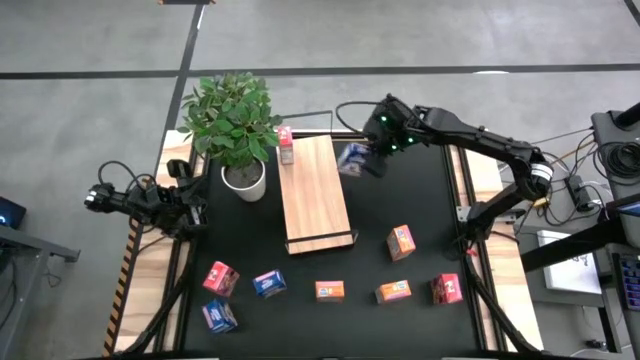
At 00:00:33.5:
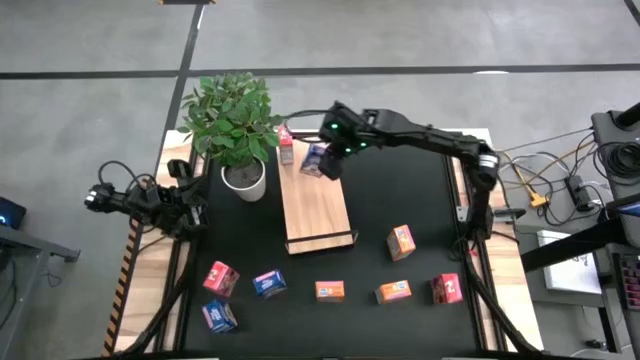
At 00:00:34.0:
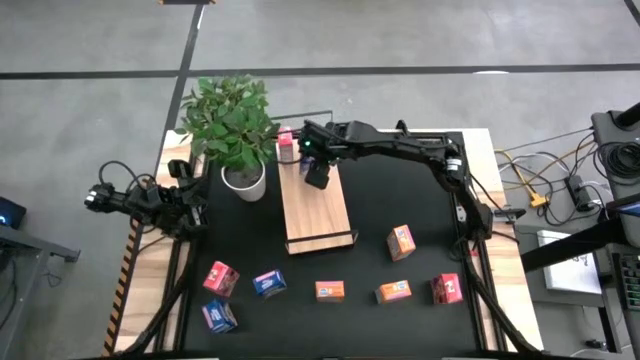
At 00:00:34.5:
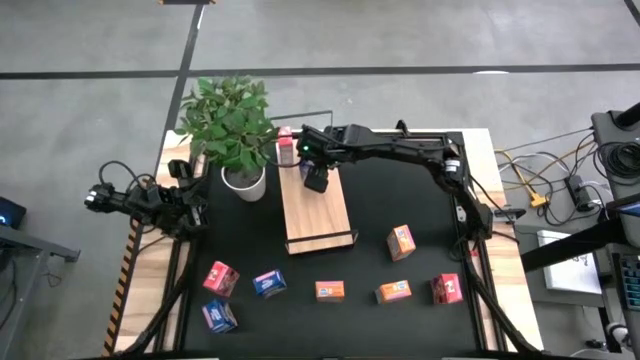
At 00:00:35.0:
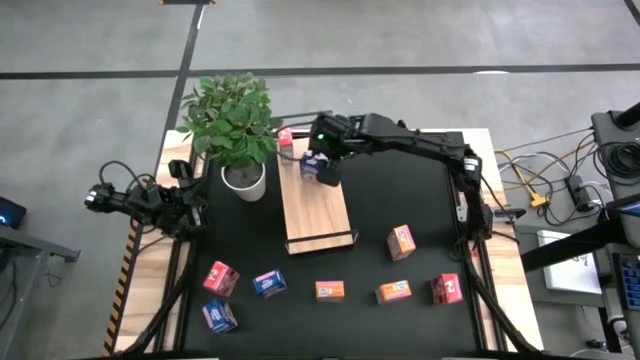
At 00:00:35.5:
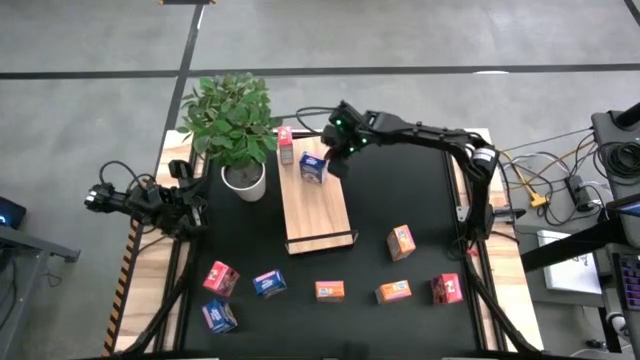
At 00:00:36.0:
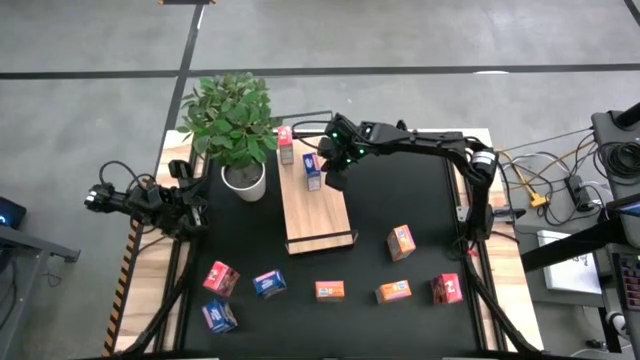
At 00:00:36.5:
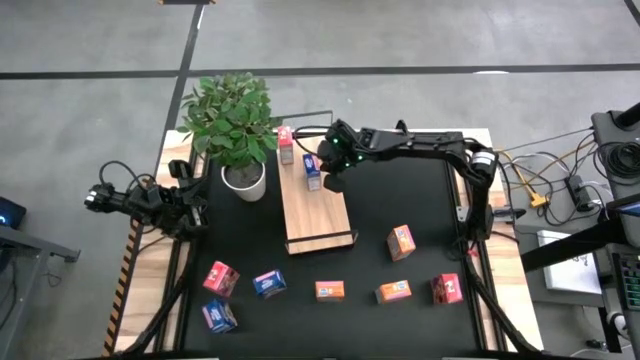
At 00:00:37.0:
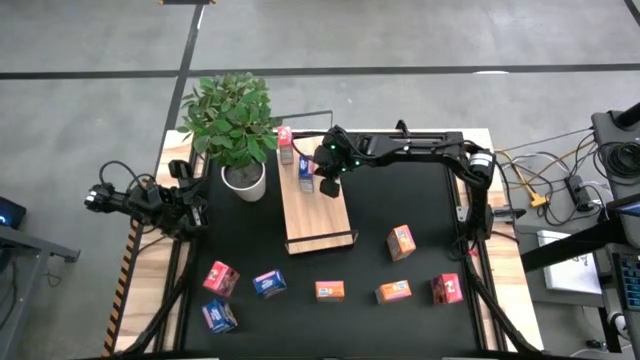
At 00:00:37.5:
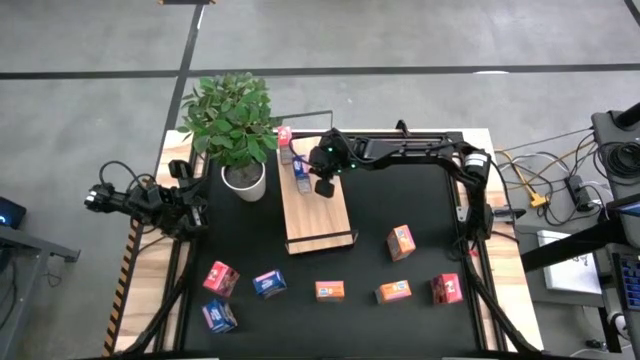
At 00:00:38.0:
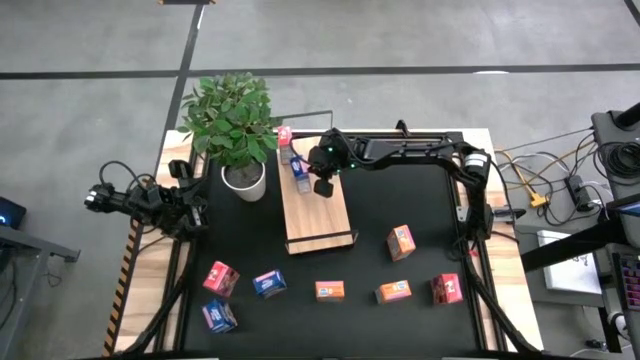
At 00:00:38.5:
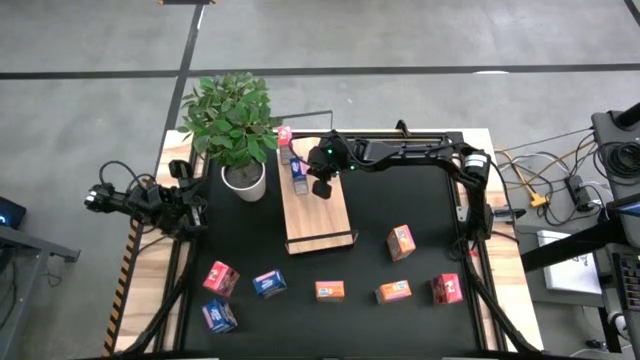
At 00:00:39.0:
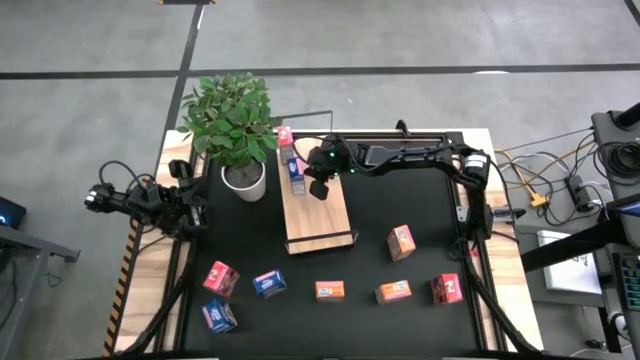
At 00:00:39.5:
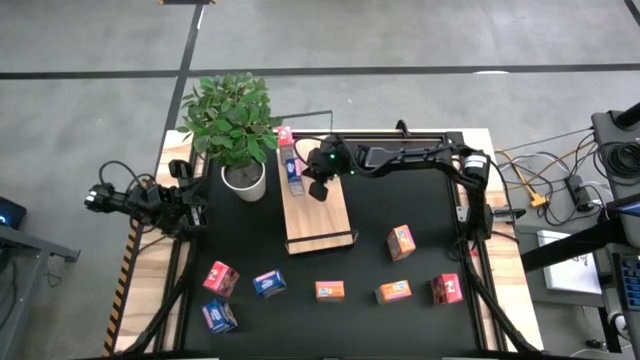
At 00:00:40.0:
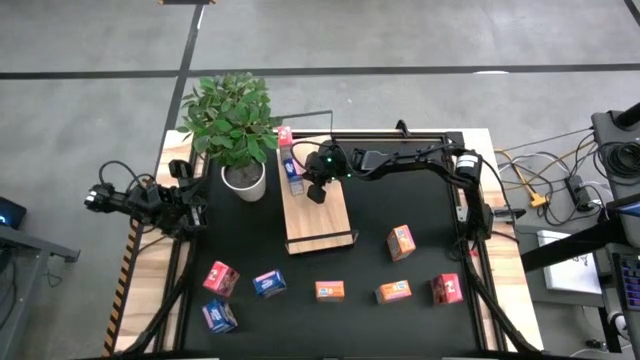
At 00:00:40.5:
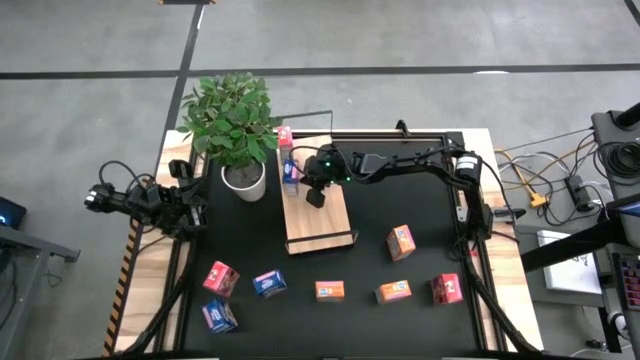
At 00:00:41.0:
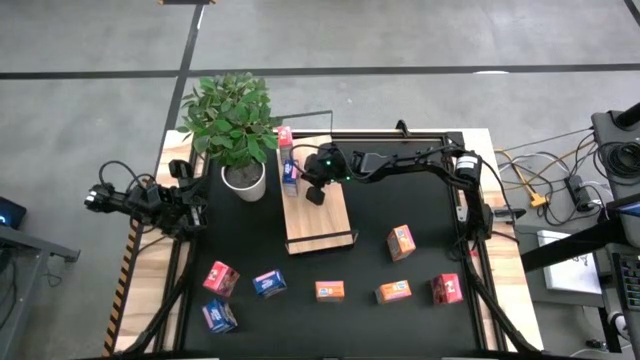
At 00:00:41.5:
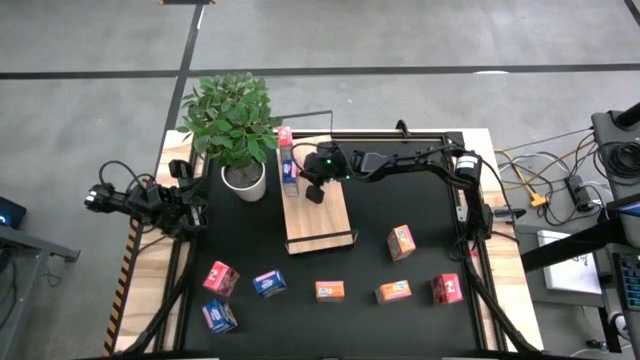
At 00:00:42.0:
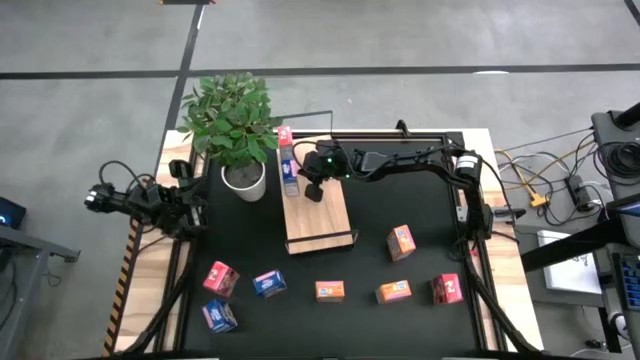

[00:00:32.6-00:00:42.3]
Task: Stack cereal on shelf
Put the top blue cereal box on the shelf

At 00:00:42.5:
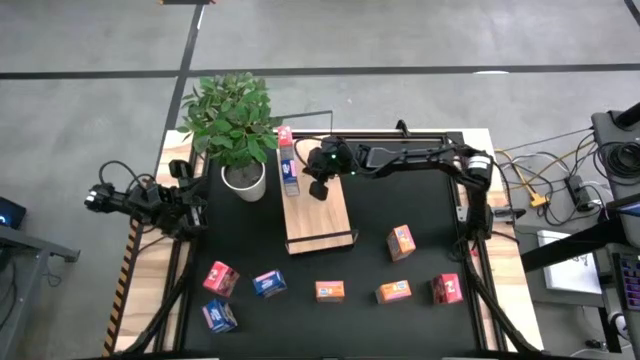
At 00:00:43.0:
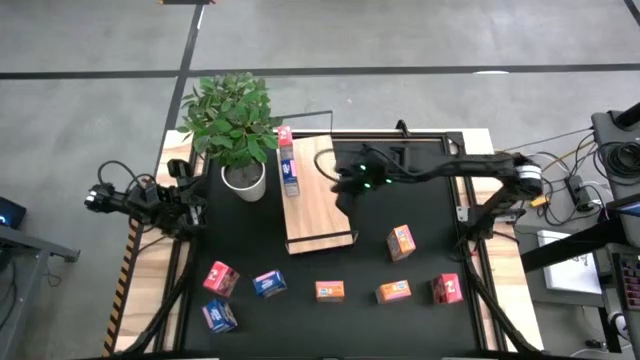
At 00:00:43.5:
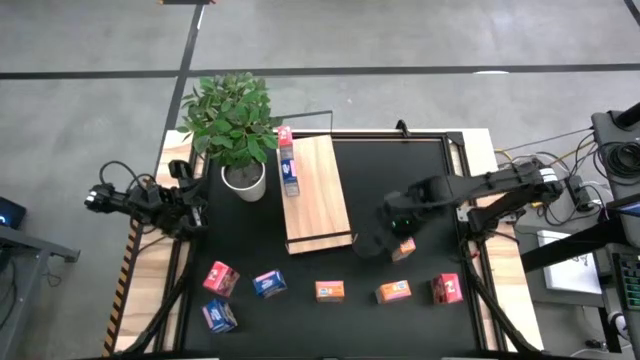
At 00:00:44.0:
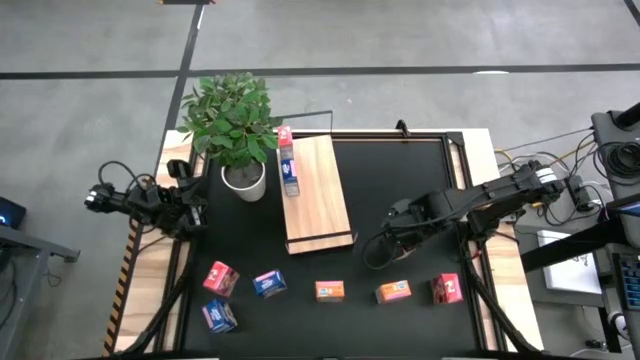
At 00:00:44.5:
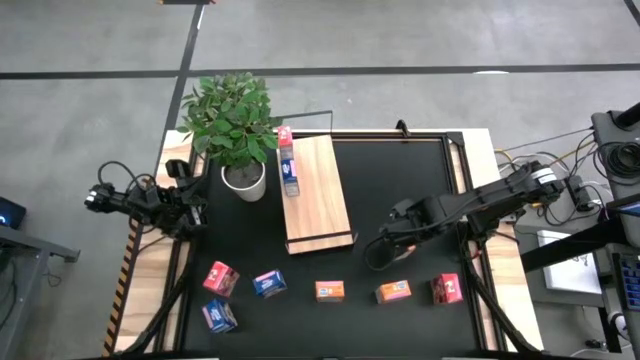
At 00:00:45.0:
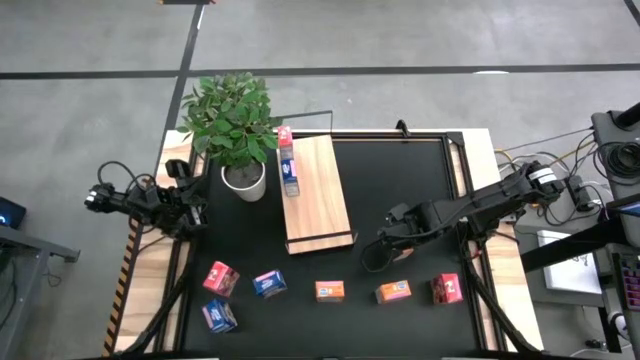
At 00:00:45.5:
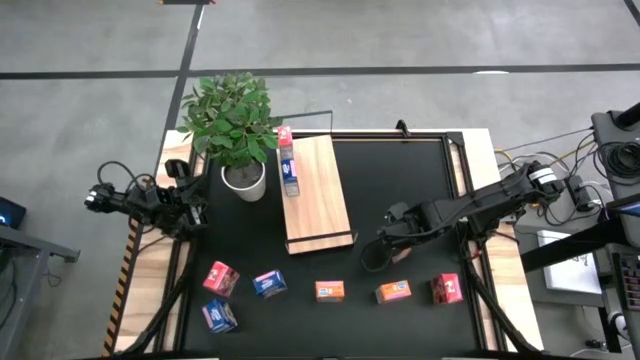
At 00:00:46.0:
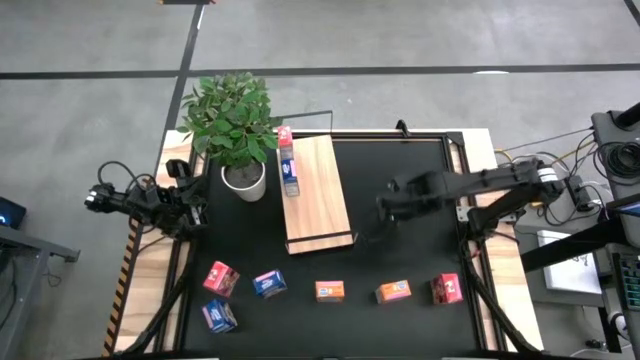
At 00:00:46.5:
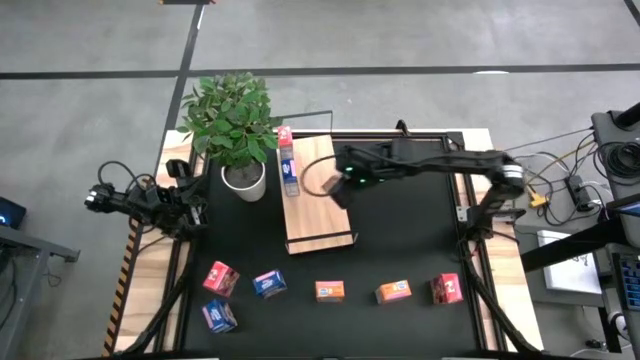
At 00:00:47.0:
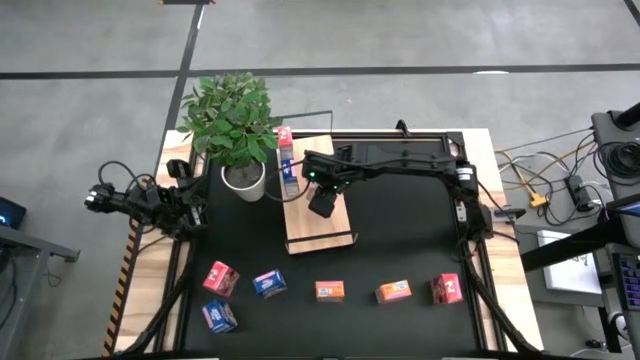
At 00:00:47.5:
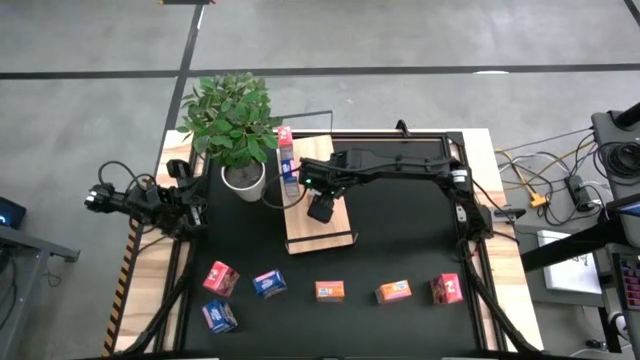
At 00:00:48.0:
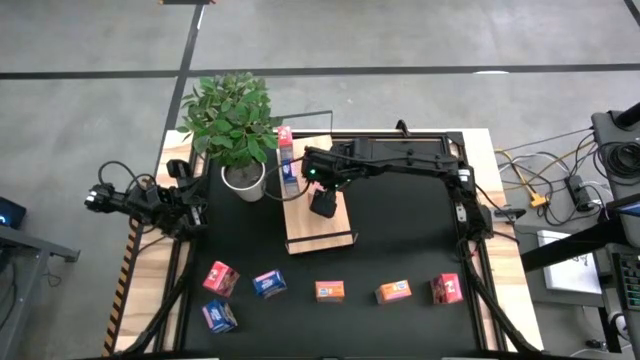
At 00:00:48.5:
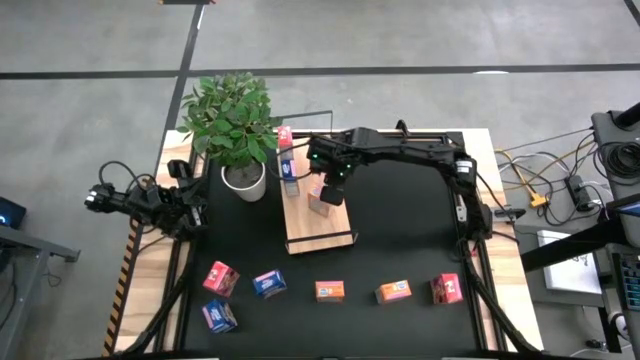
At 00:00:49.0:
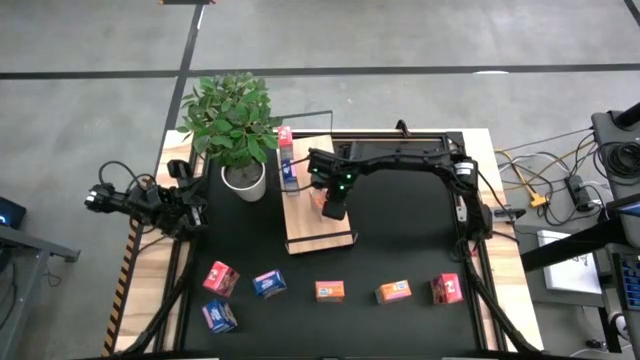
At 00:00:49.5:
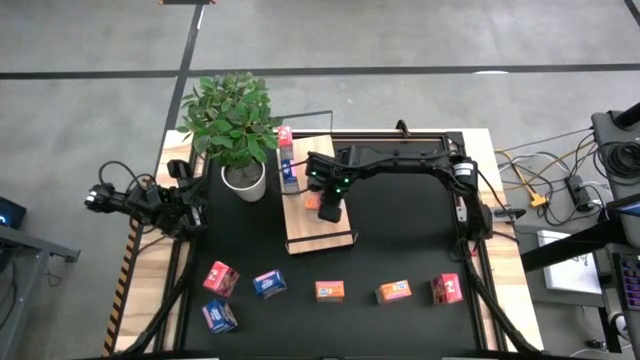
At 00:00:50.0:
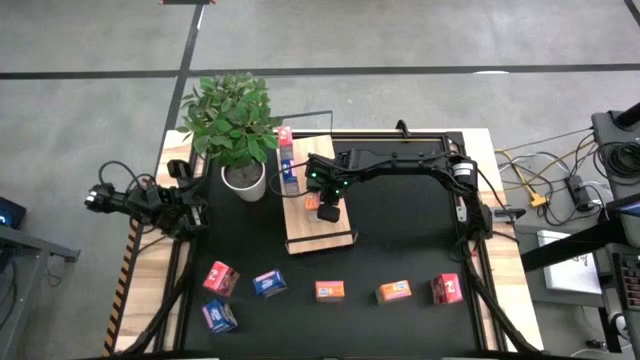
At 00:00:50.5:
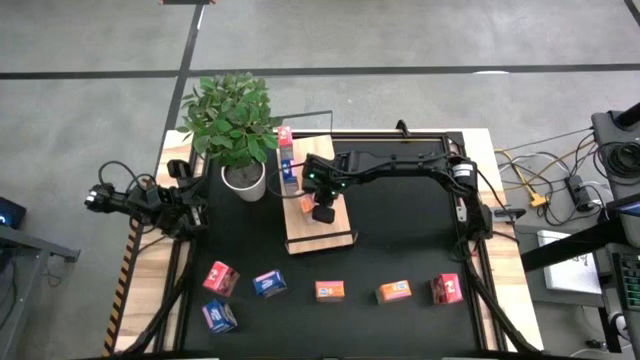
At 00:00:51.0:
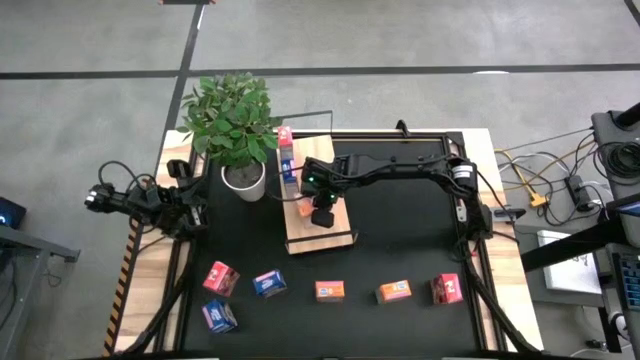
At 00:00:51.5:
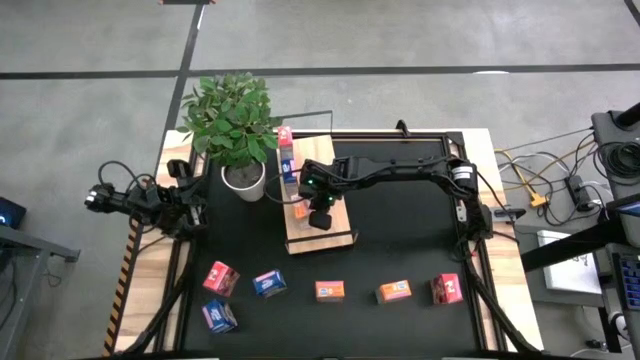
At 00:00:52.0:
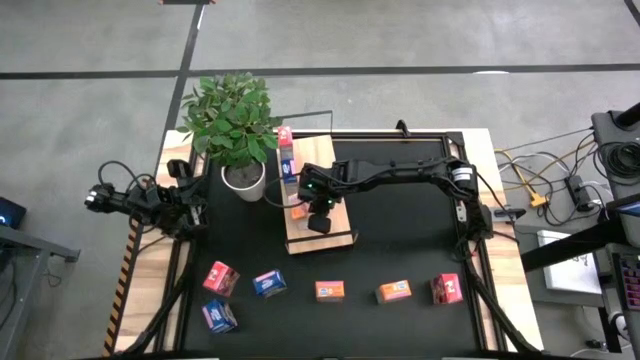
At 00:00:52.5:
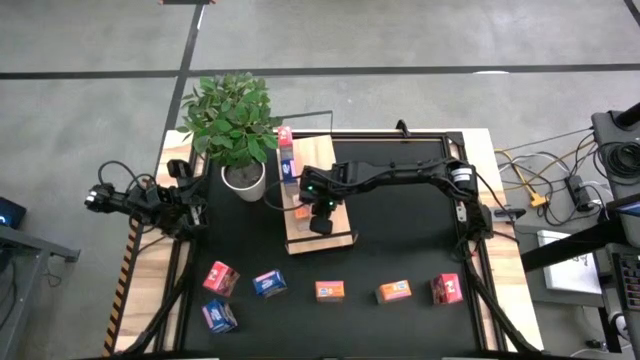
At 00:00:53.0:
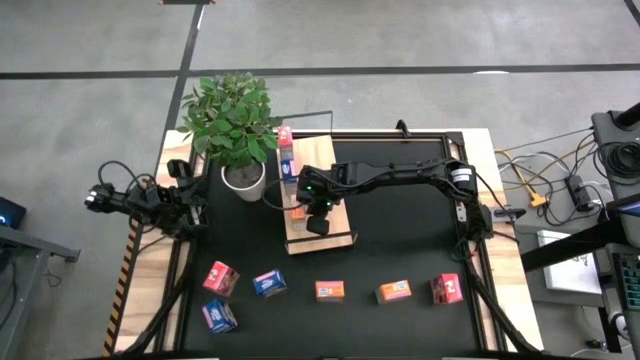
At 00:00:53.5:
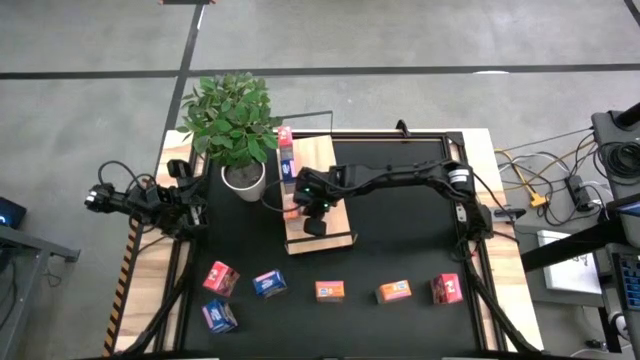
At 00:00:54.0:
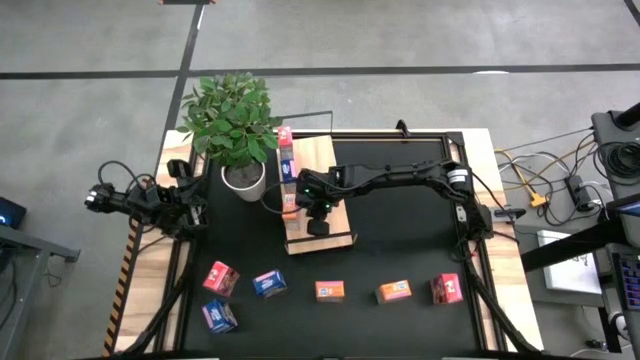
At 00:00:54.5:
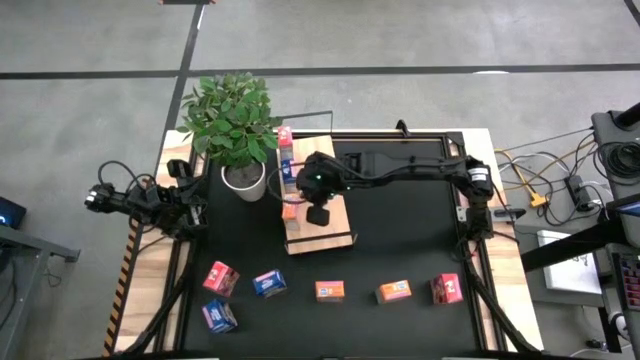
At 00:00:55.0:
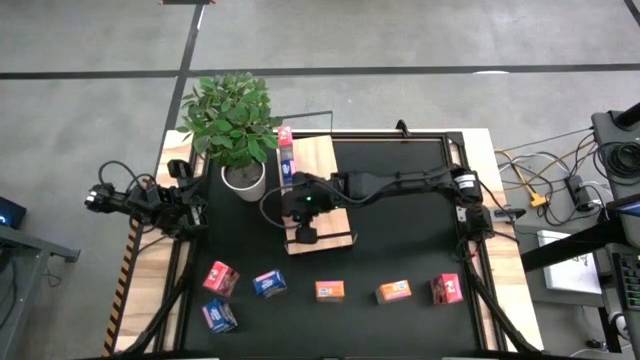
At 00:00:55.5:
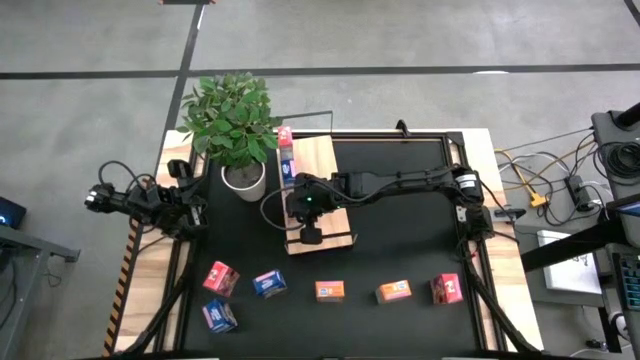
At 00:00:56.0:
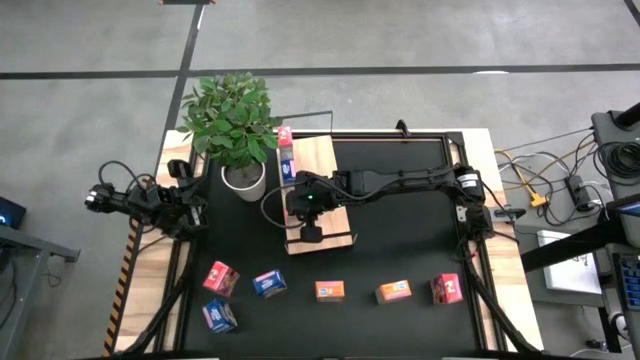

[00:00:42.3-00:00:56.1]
Put the top orange cereal box on the shelf
